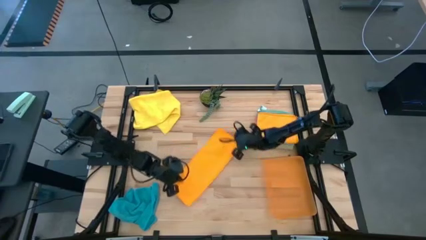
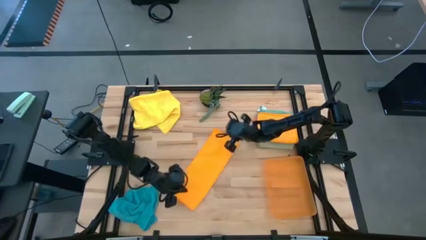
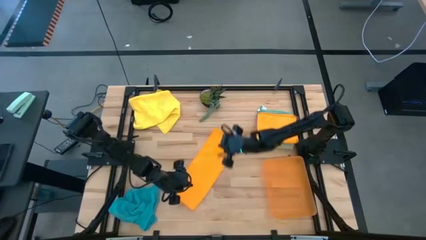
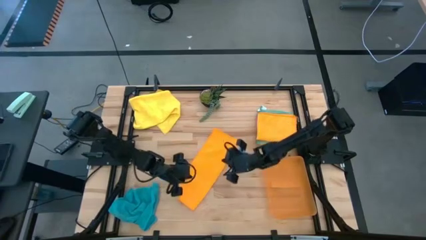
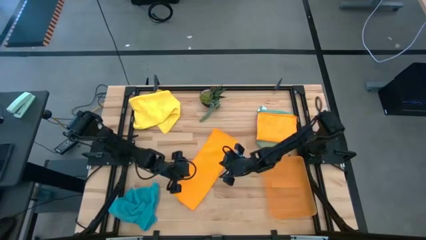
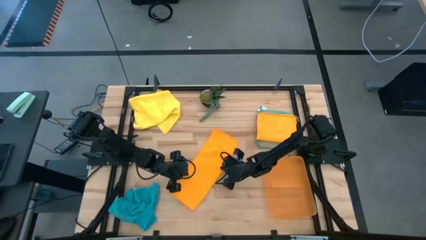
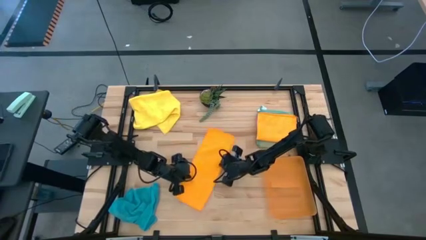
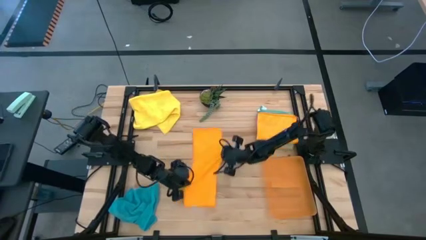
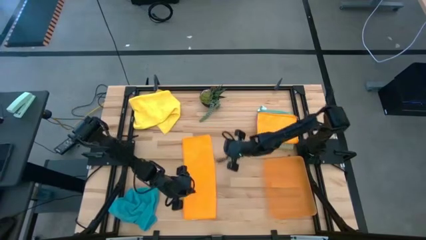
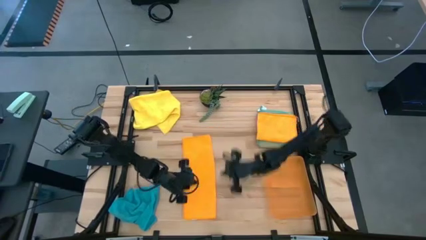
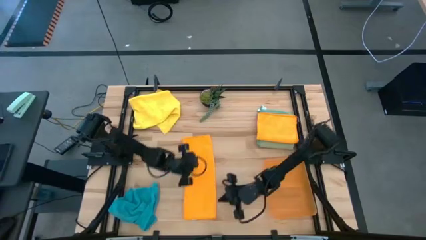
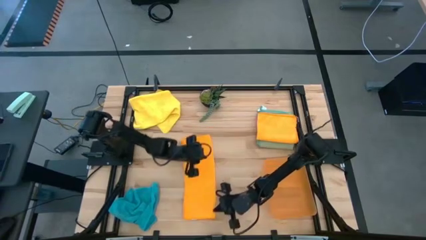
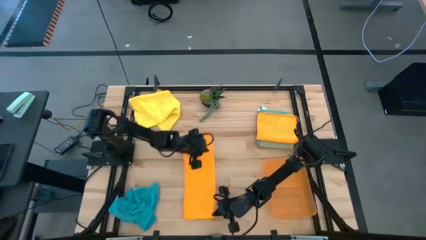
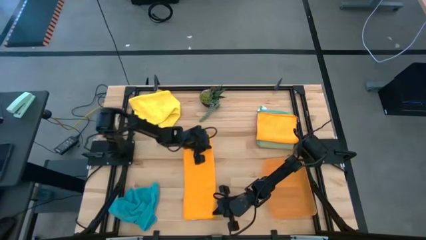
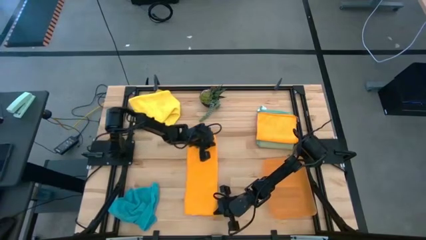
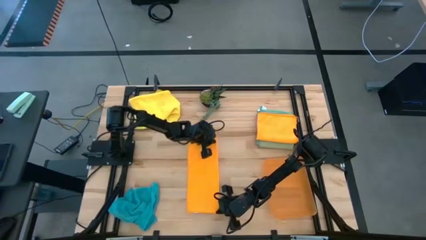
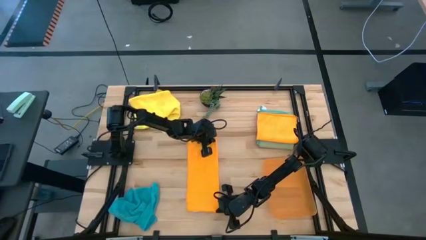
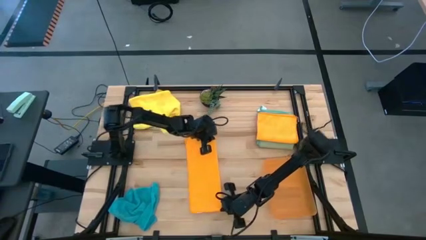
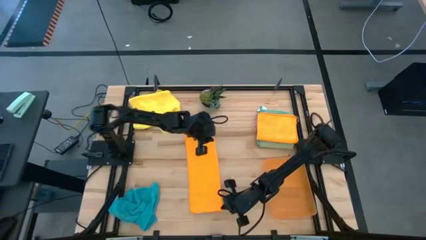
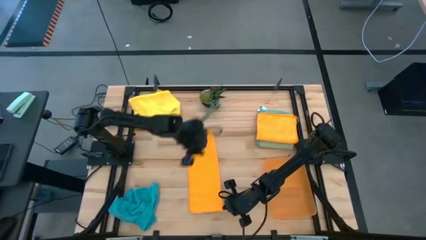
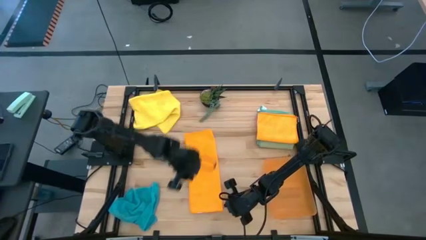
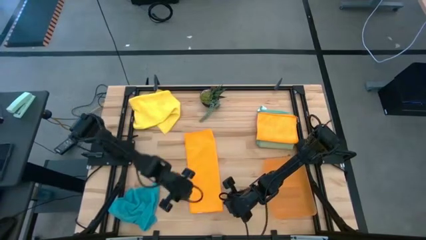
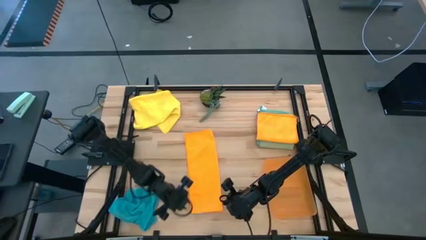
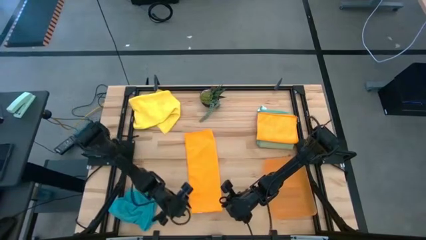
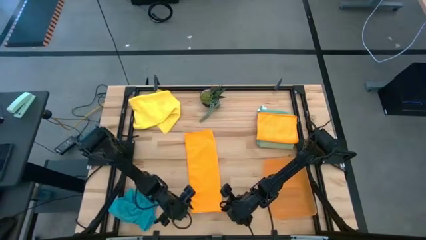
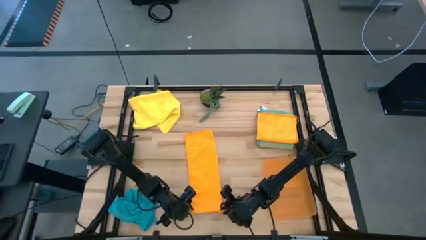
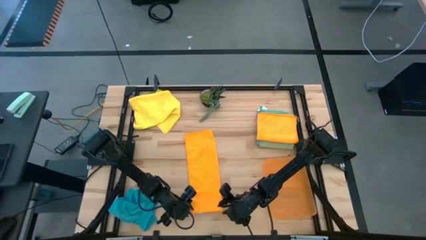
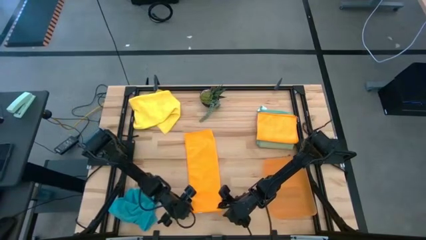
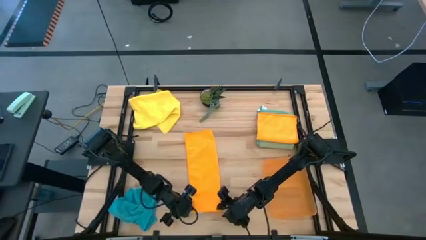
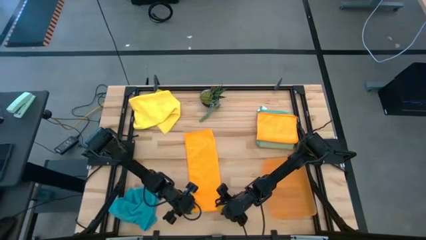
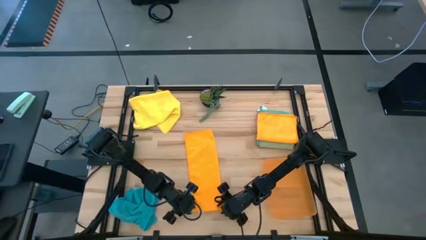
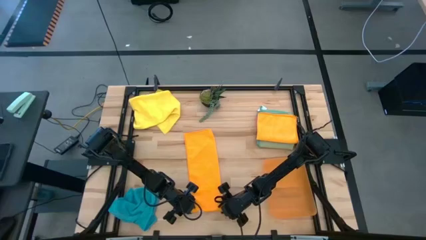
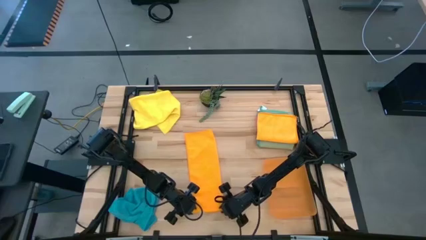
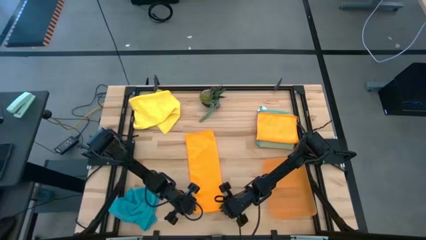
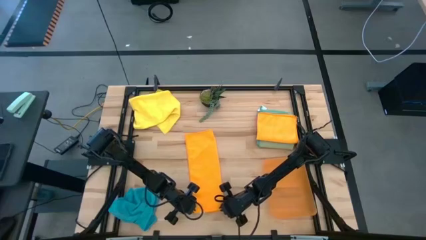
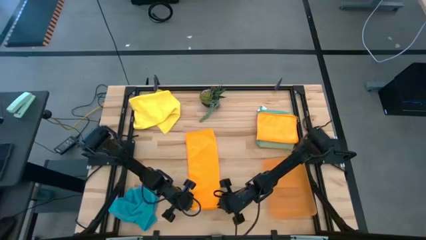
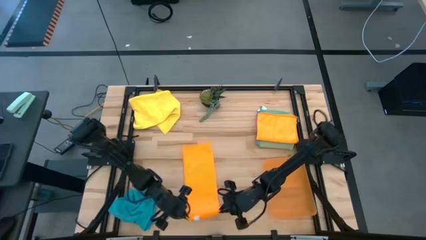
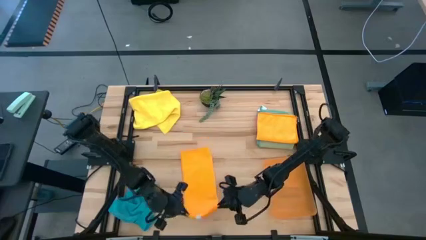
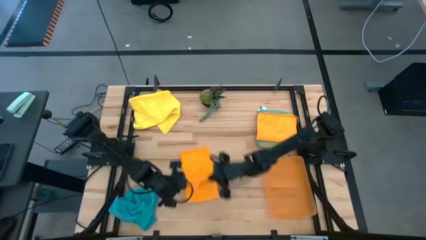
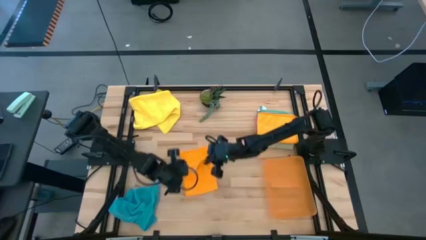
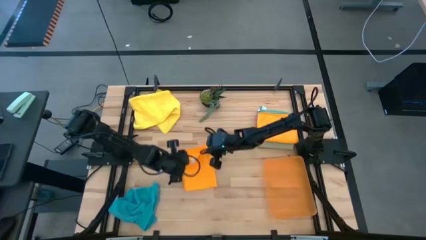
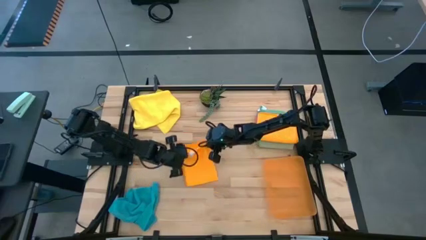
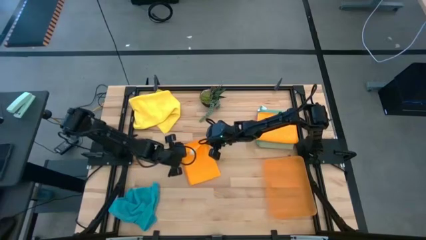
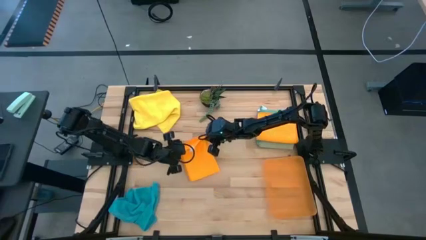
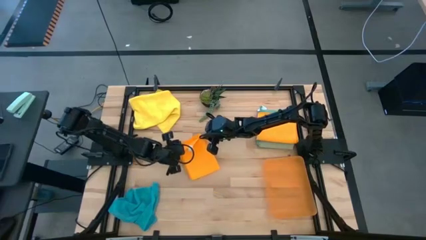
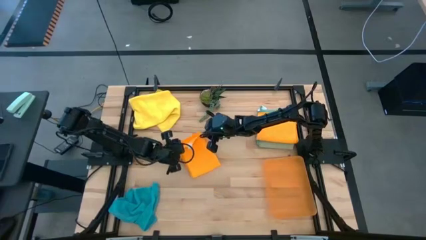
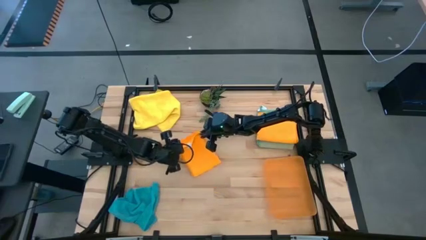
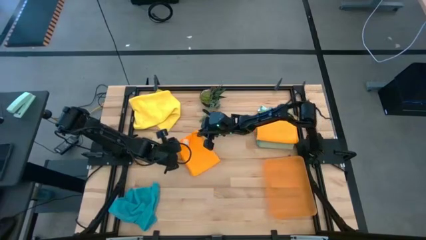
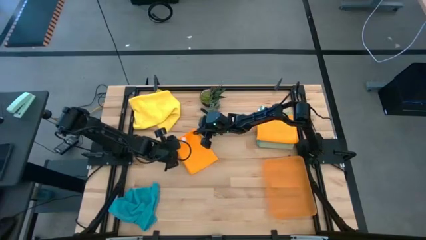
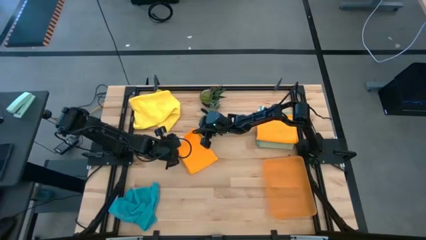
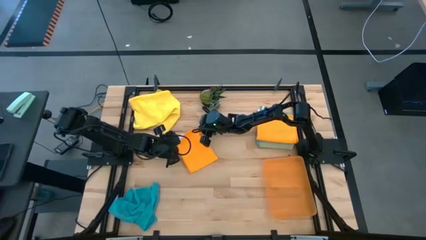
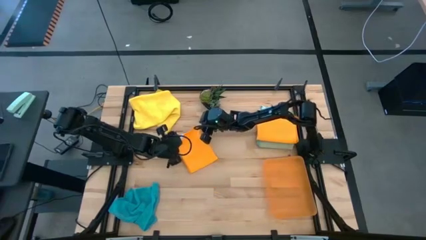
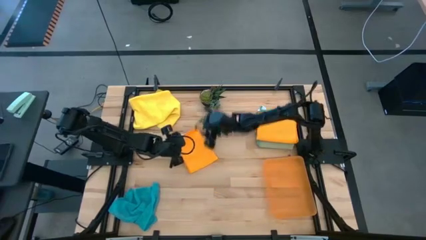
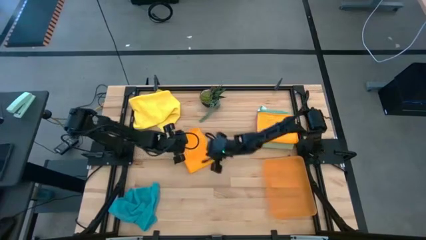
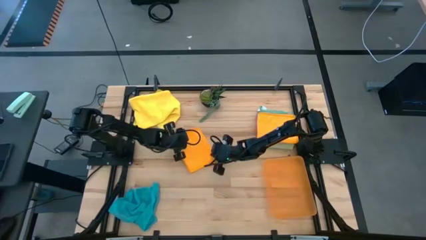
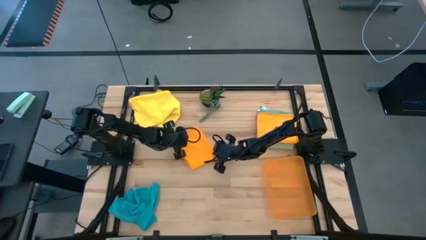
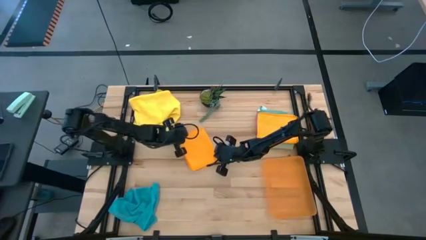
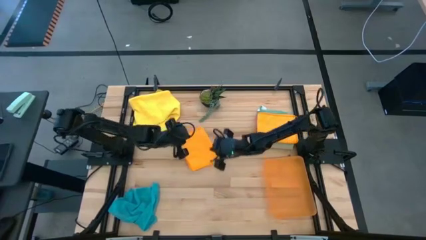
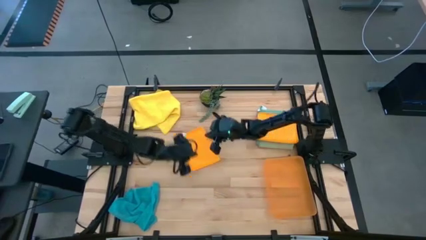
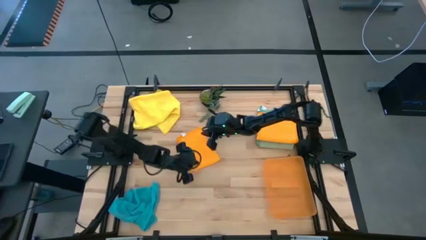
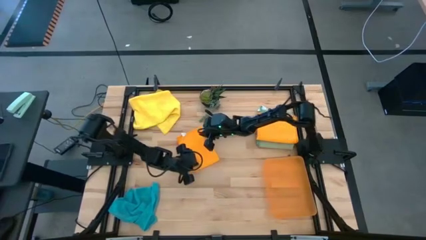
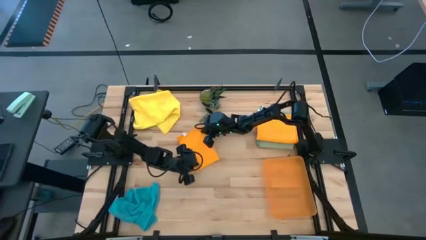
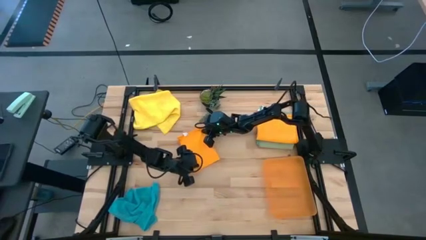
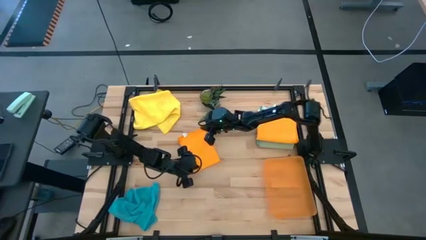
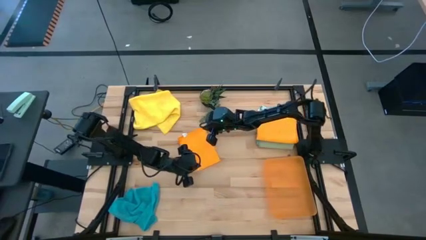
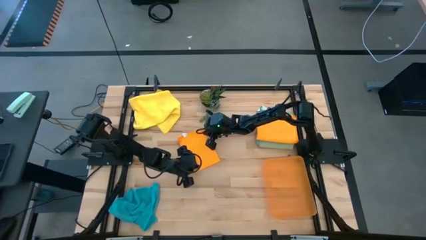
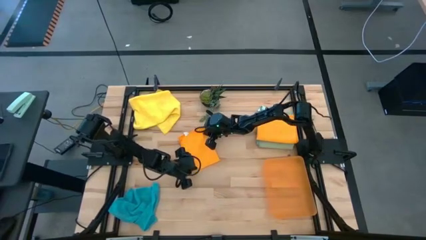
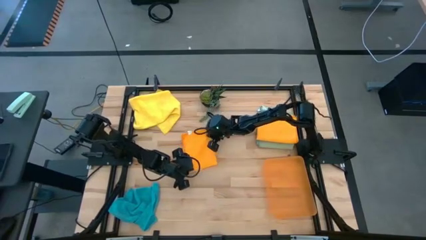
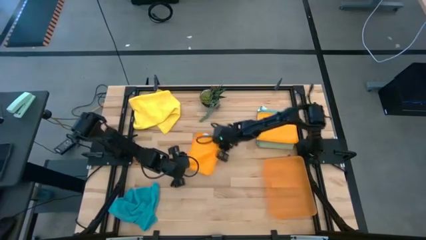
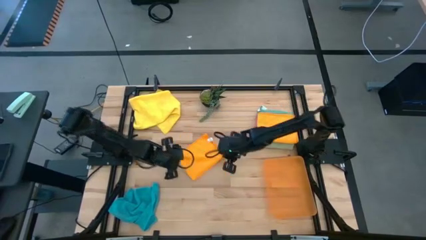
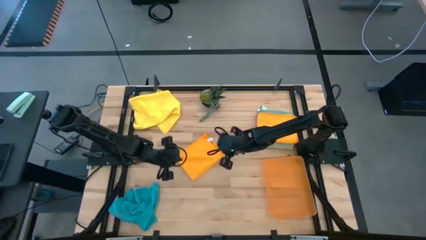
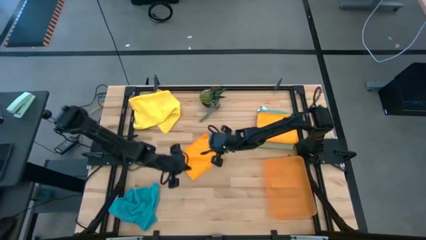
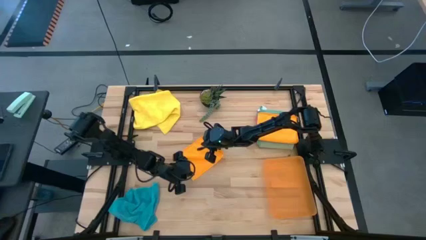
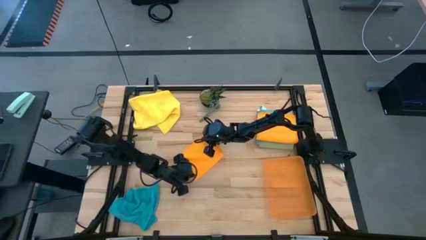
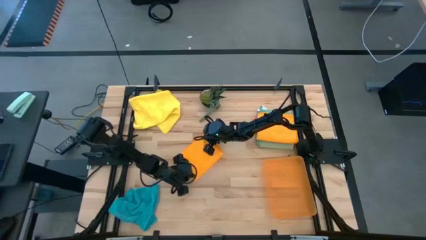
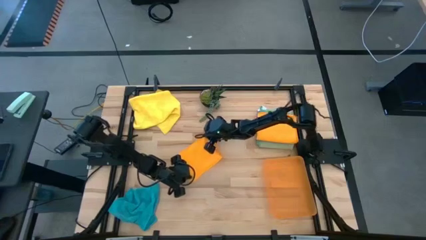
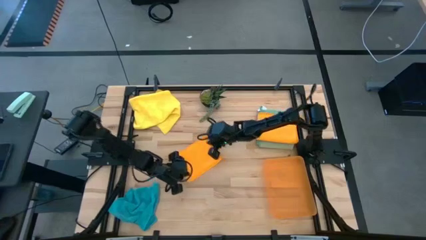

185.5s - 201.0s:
Task: Fold microfiber towels
Fold the orange microfiber towel

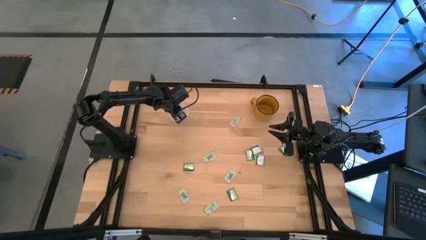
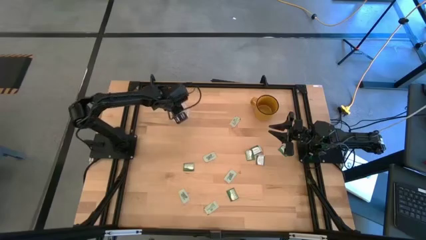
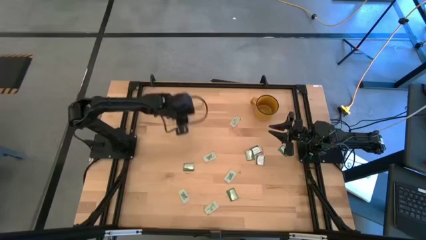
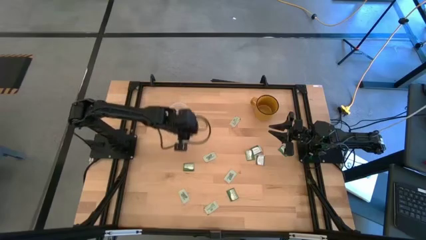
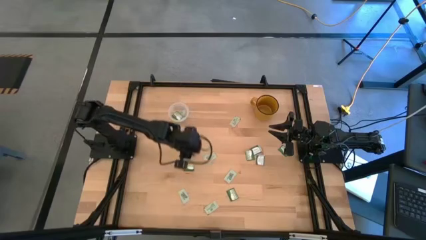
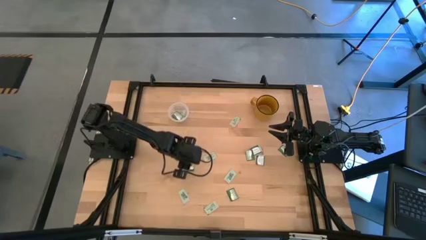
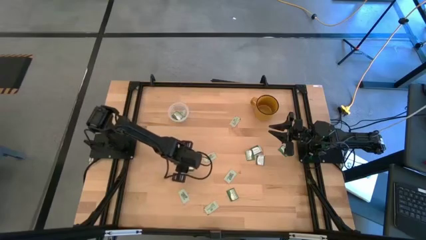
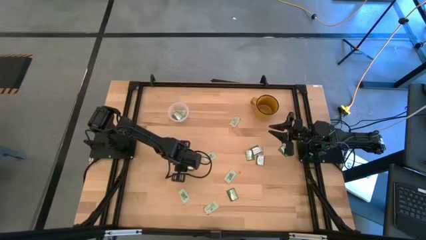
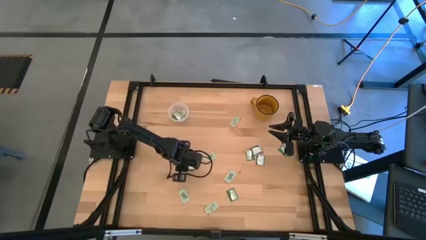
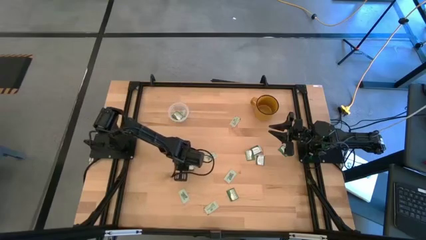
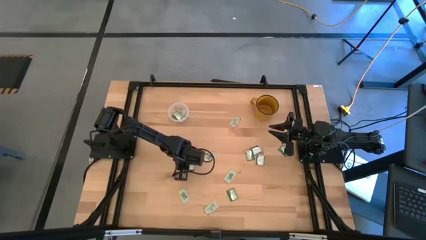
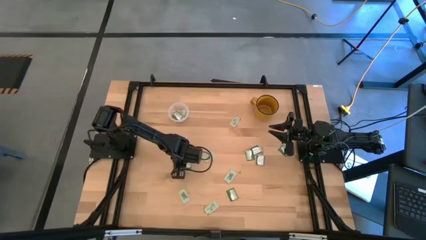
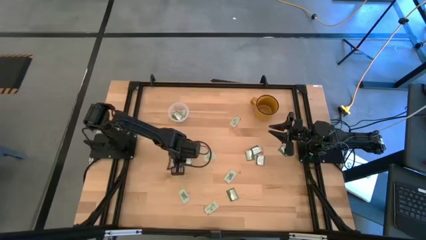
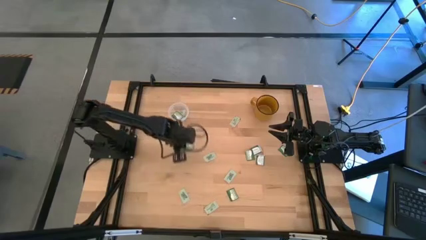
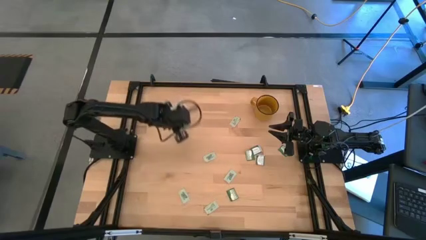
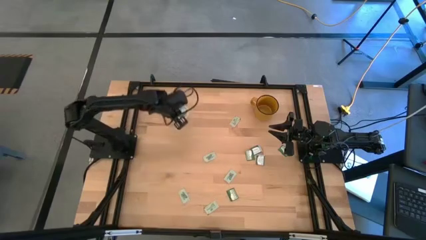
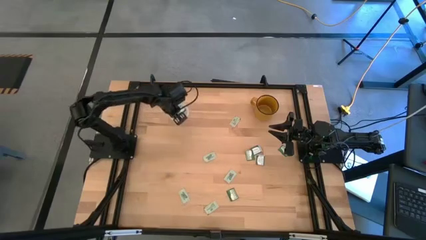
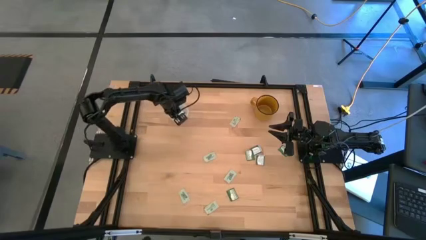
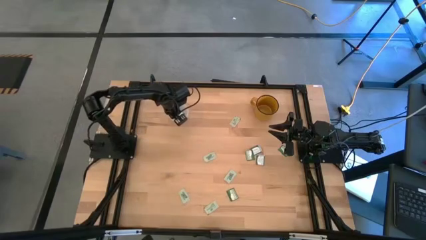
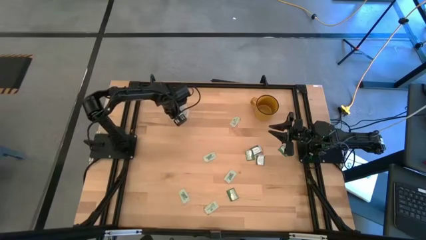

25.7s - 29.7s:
Task: Pick and place Stevia / Truvia into bins
Put the truvia packet into the transparent container
